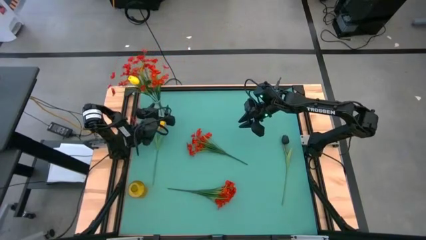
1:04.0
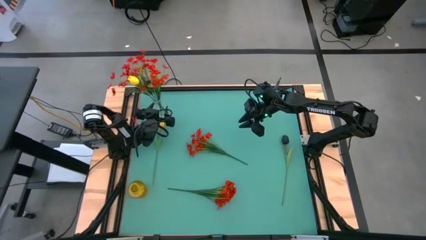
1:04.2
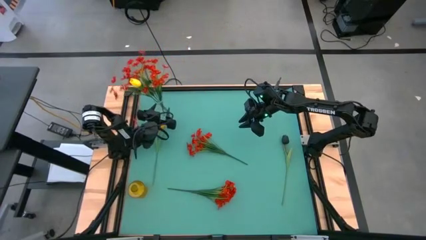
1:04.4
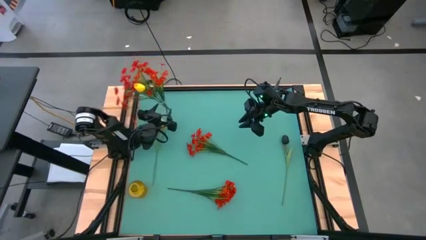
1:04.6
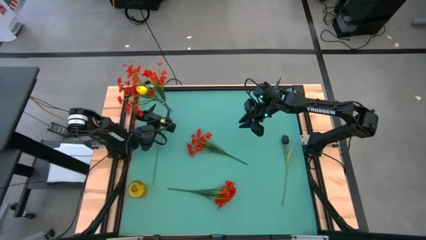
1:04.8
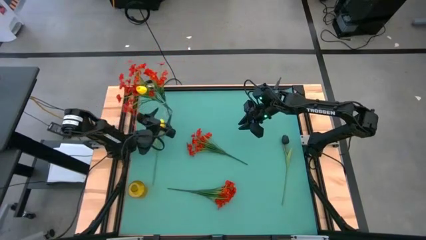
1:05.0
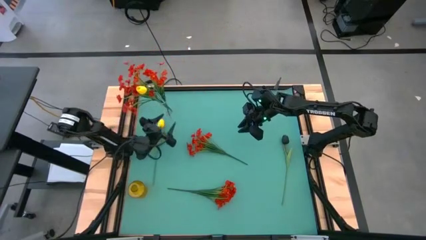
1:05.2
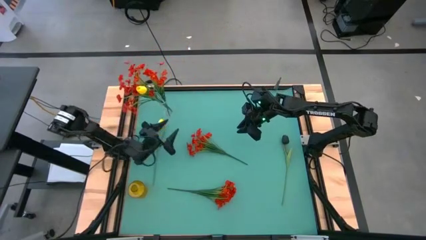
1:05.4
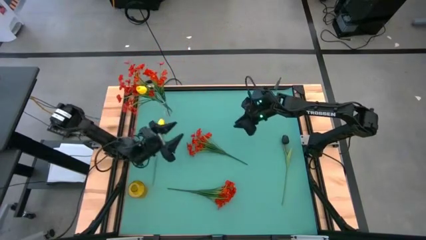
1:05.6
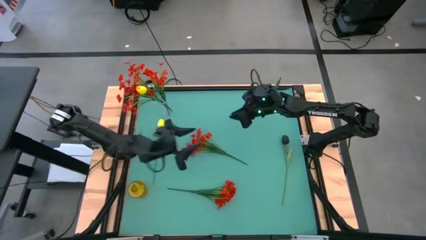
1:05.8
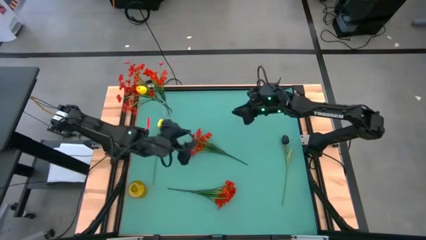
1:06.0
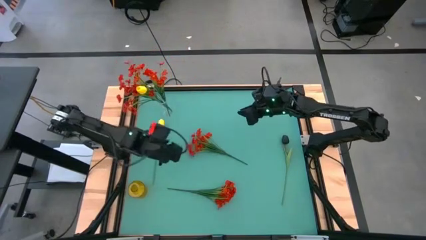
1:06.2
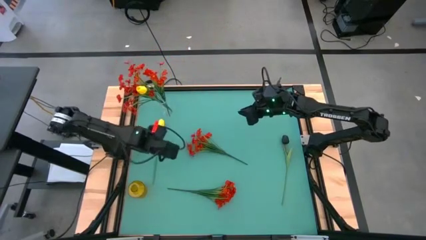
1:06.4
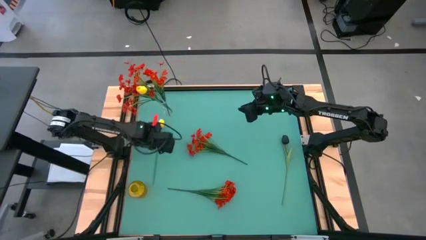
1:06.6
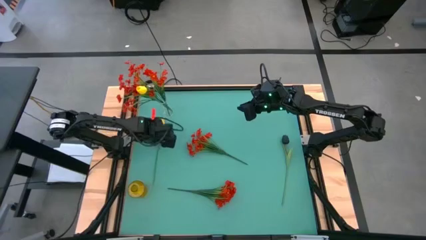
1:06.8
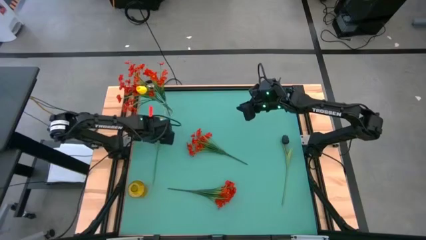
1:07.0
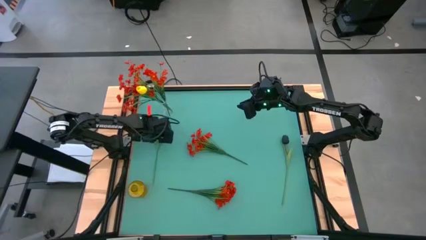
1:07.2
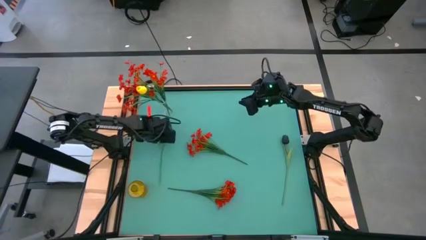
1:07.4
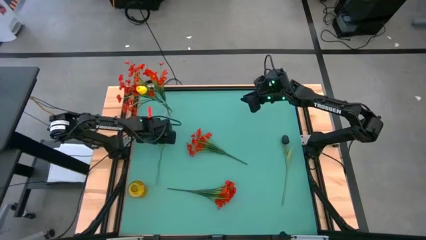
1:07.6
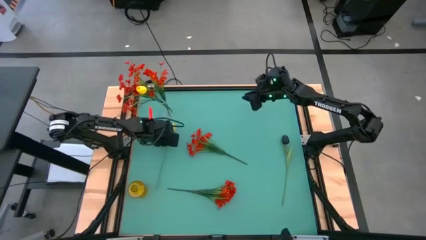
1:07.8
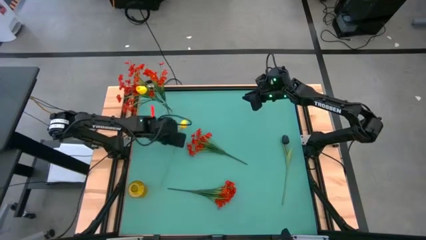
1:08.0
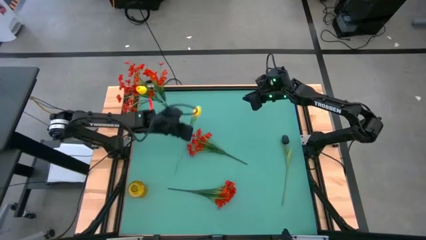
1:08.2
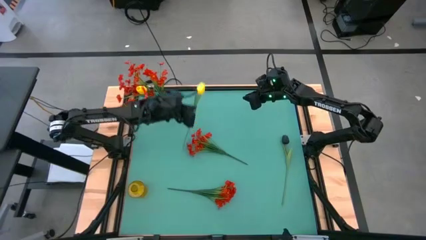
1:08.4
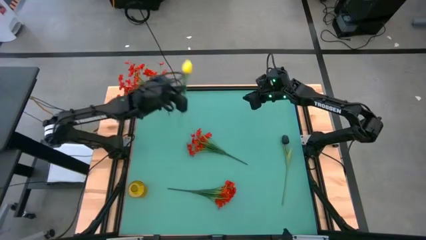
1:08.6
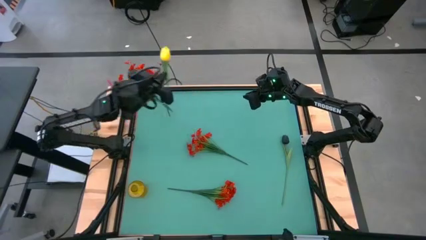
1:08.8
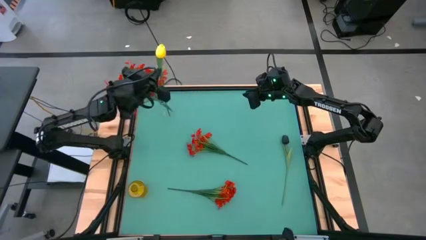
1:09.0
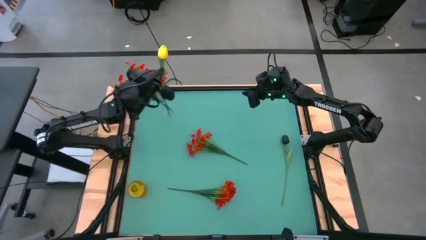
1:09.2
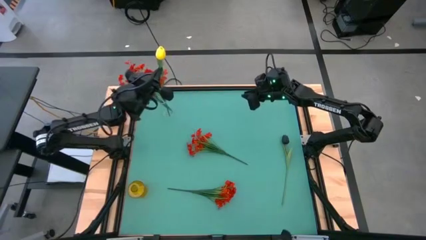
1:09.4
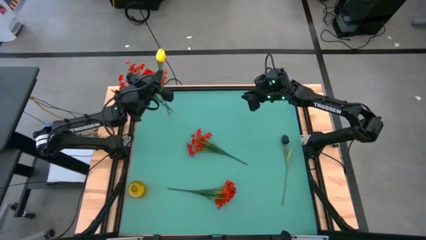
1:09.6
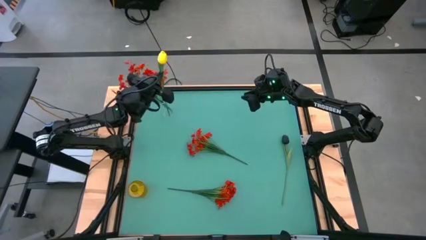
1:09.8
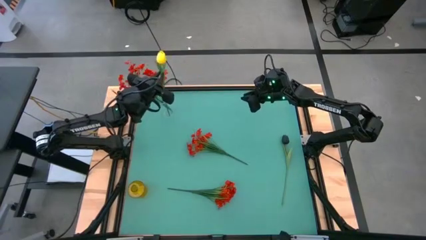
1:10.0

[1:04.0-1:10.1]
Task: Sort flowers into vase by color
Put the yellow flower into the transparent vase

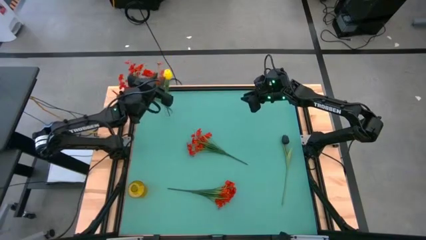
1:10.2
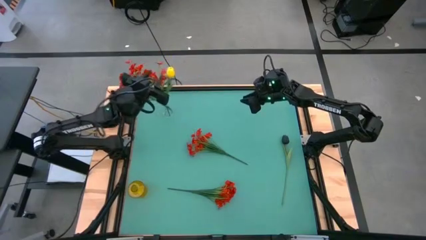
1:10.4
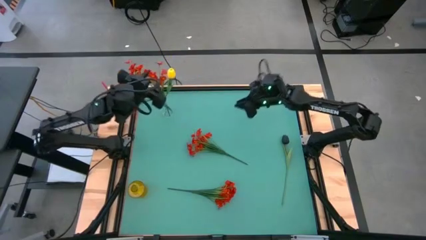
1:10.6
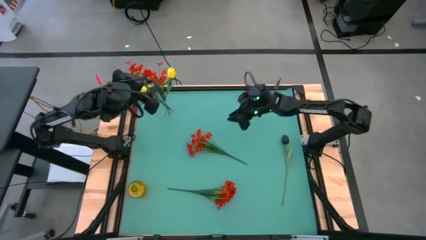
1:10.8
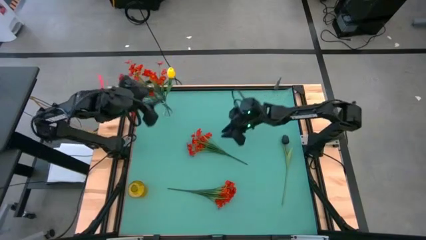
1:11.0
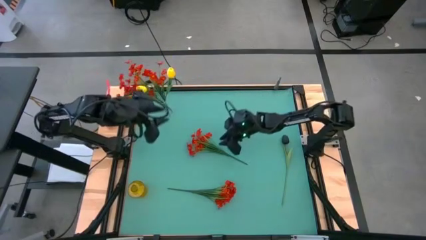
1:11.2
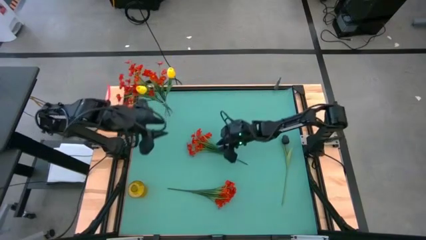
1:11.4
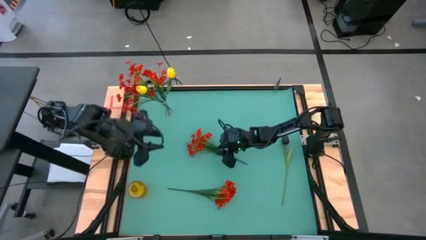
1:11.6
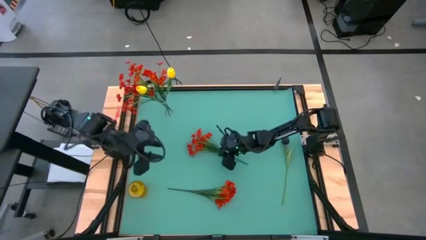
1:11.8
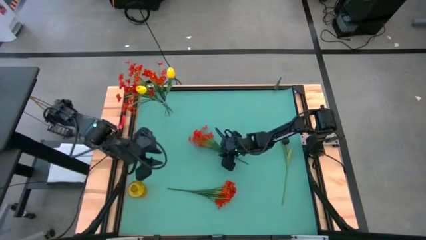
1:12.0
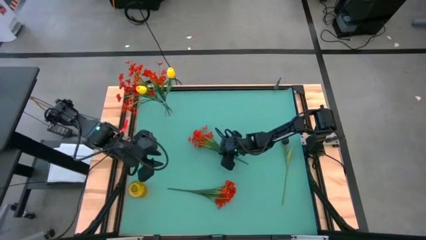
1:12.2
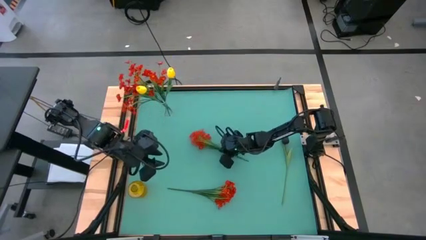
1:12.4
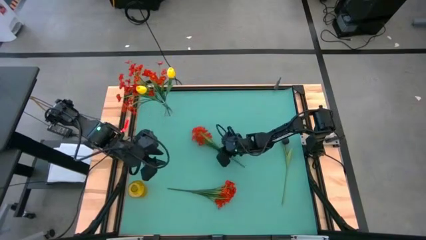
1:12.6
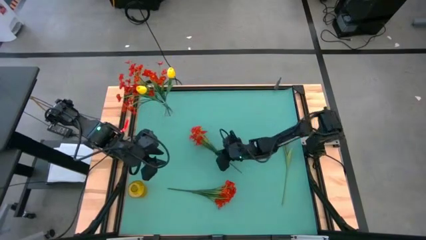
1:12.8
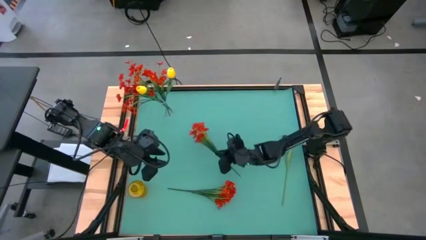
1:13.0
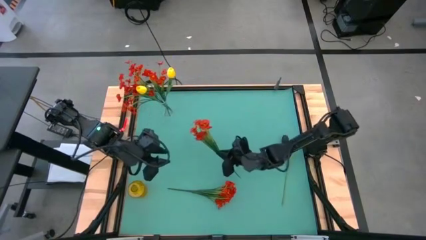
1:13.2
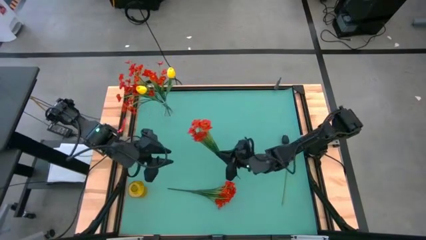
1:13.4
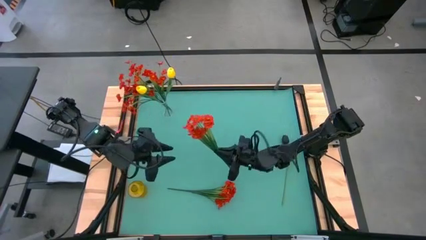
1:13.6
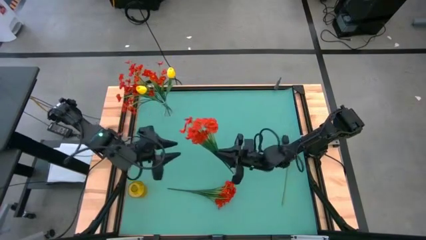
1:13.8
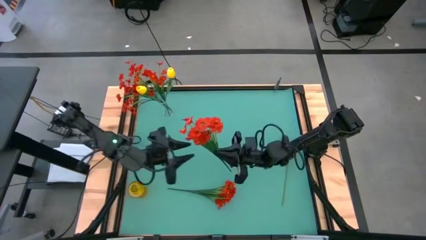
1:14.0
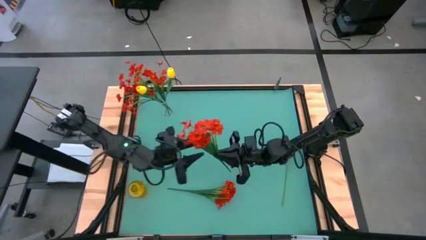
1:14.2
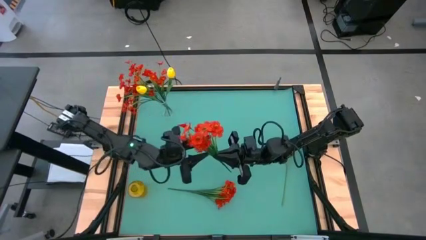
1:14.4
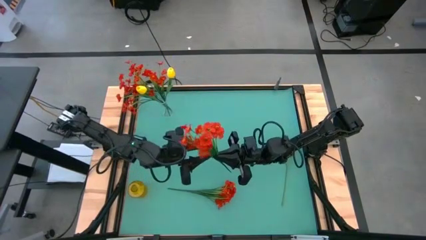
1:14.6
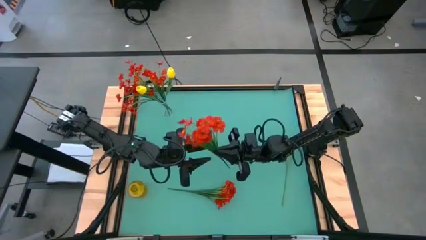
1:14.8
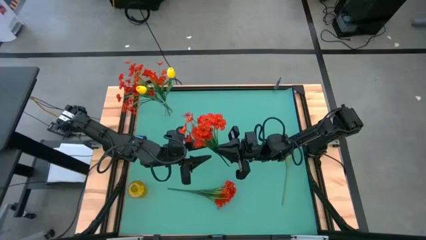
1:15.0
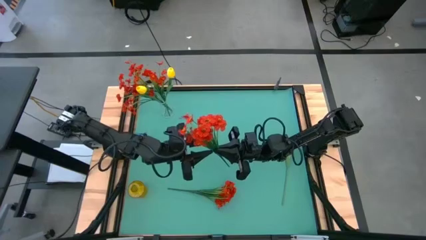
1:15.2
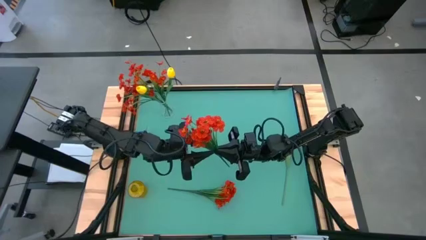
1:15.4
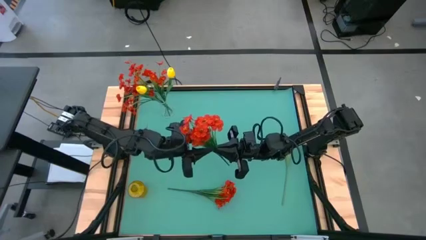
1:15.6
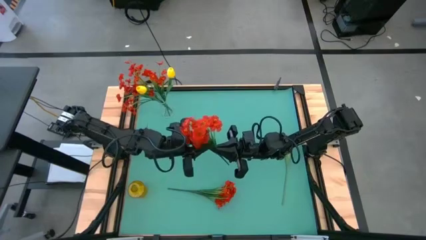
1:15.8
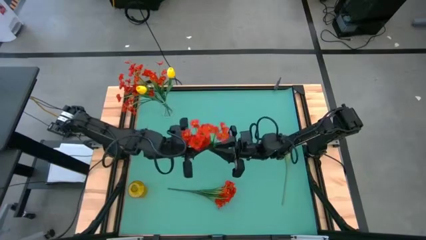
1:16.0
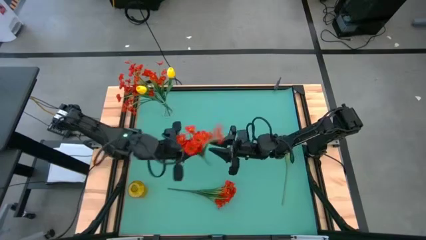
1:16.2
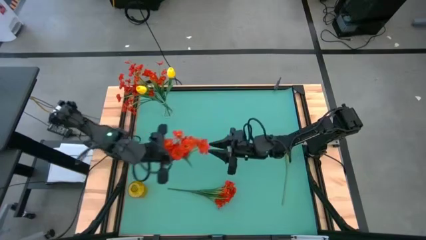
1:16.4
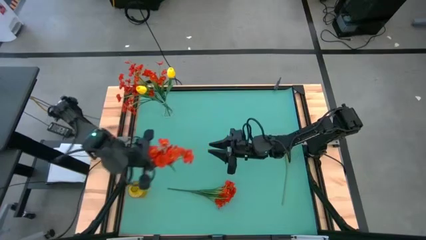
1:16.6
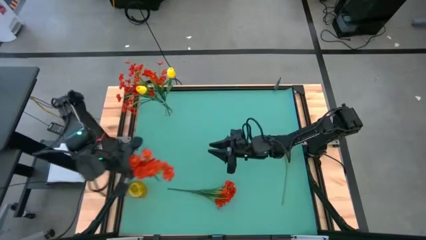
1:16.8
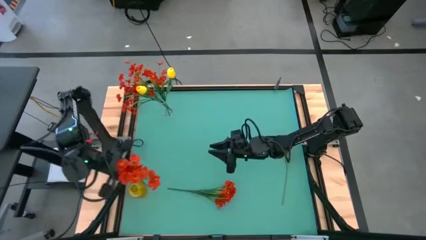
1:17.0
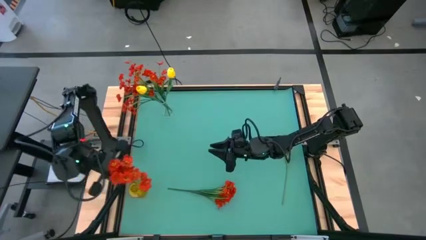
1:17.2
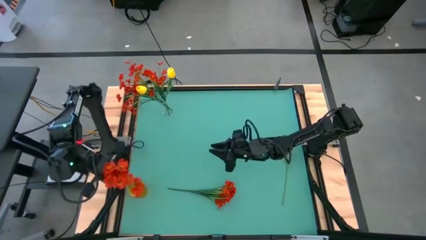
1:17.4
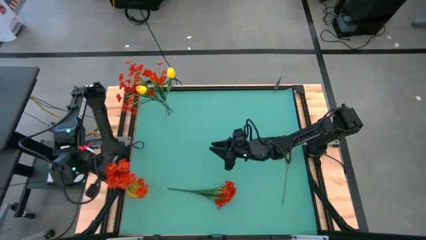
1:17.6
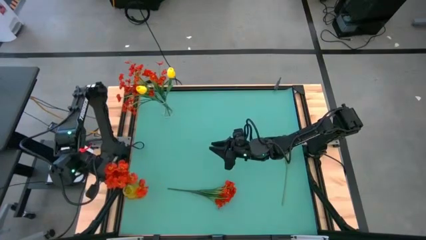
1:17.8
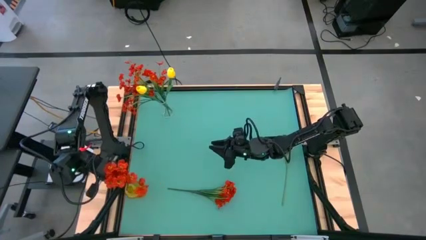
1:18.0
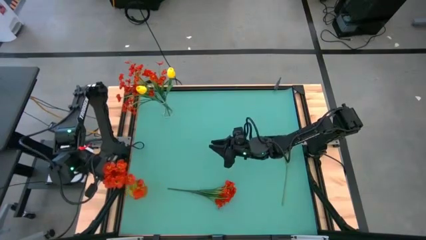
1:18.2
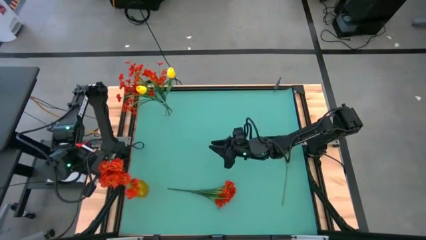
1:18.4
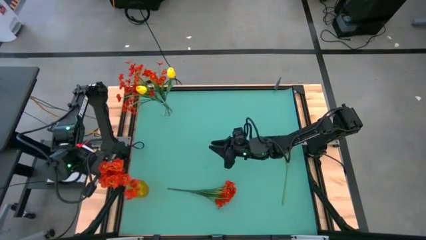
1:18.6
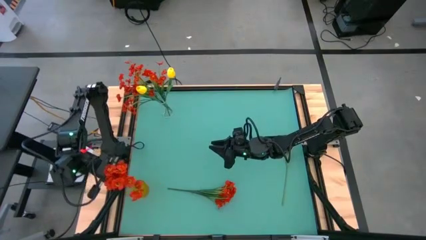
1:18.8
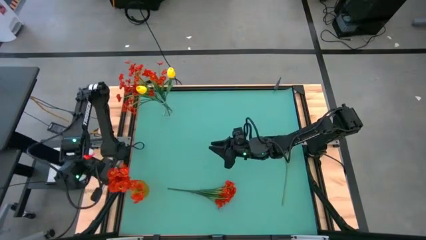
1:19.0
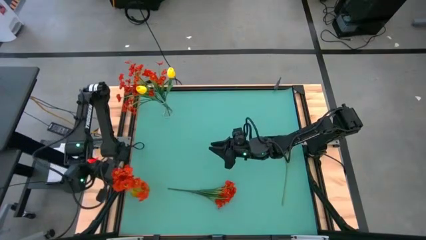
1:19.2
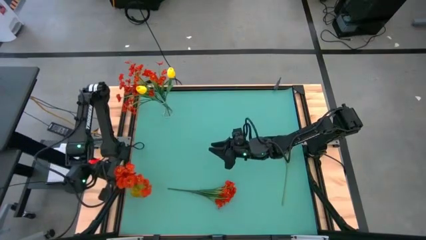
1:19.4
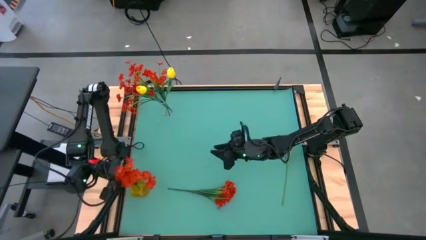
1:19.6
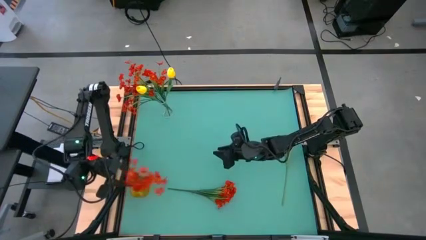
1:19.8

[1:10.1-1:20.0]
Put the top red flowers into the yellow vase

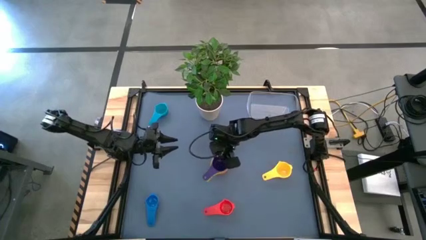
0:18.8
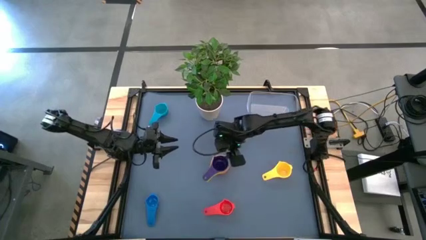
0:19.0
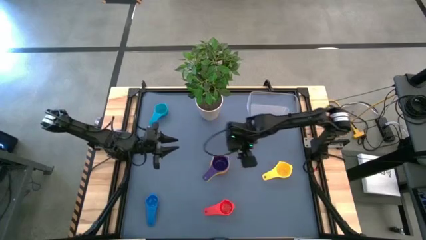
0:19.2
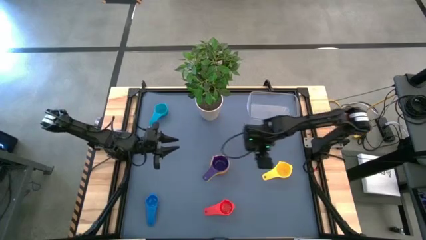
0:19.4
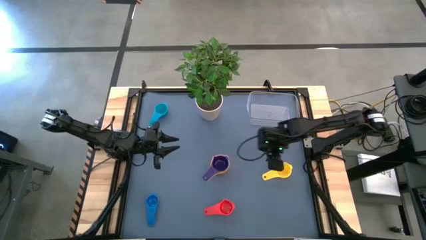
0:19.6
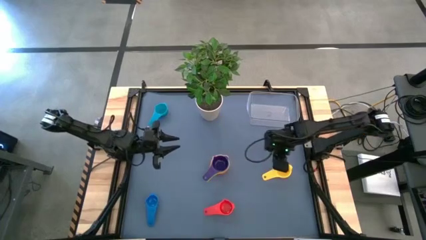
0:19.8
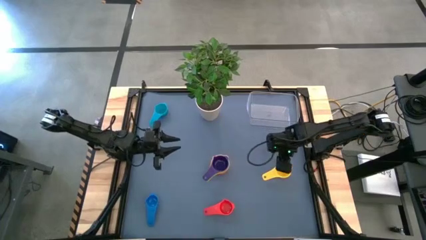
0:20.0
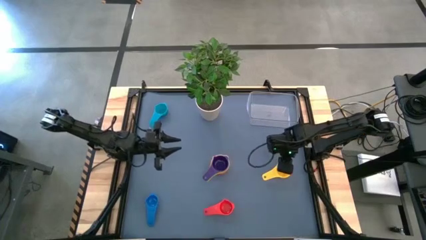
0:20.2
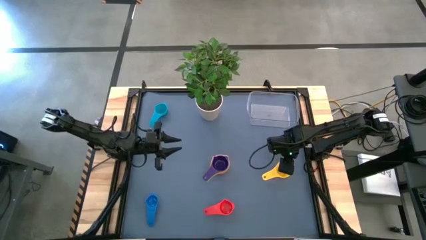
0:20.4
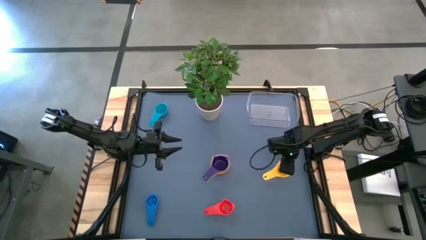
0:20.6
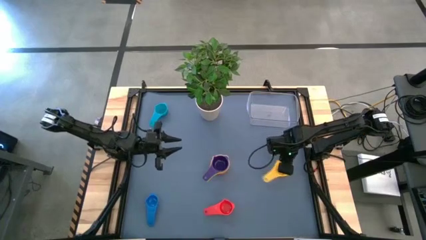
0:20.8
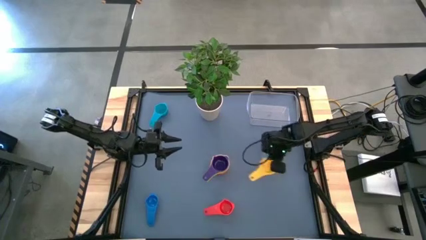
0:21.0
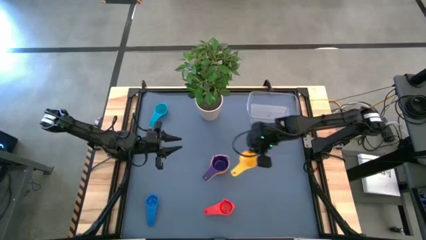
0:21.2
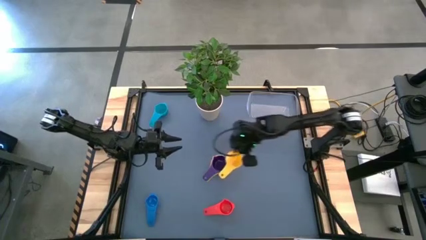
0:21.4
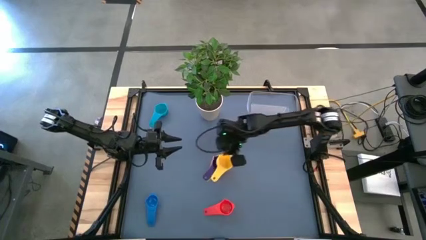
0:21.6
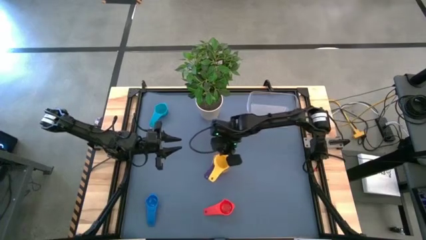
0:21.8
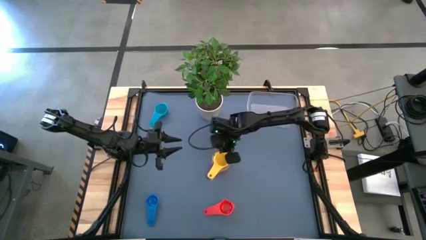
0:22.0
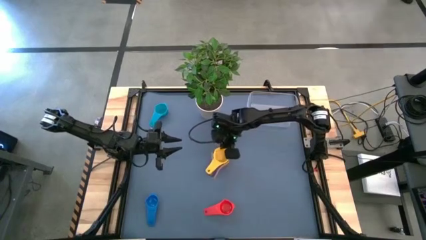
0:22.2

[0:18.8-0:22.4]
Task: Nest measuring cups in basket
Stack the yellow measuring cup on top of the purple measuring cup
